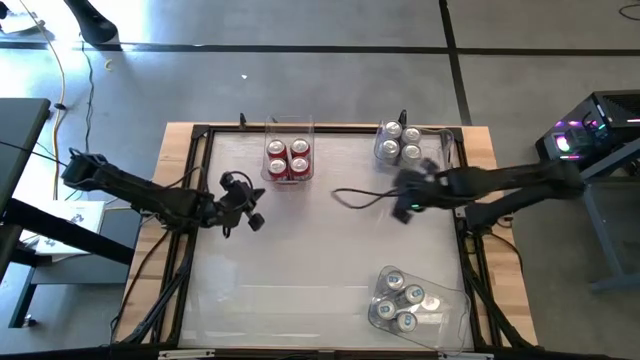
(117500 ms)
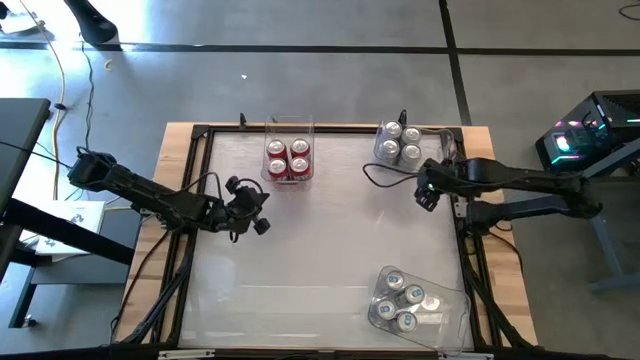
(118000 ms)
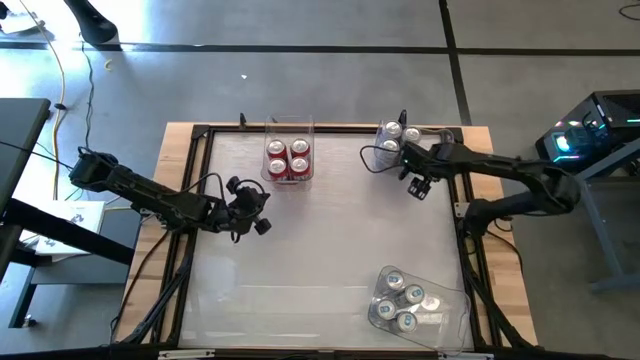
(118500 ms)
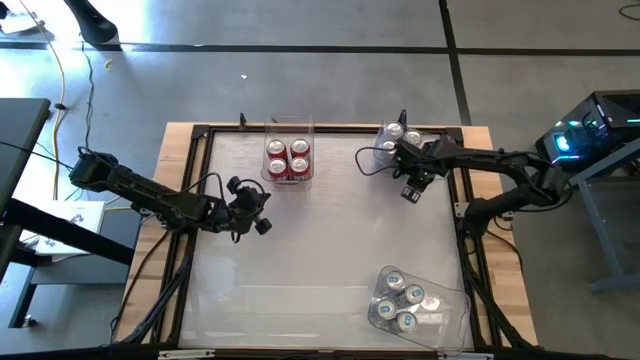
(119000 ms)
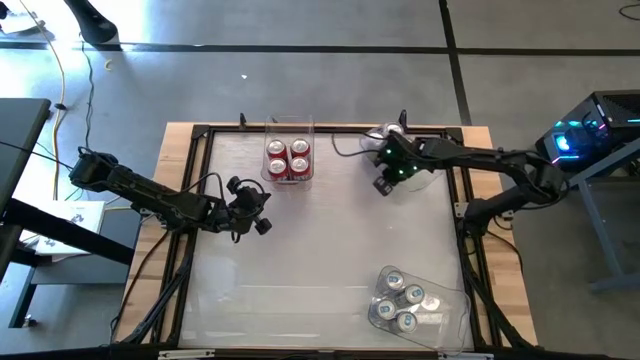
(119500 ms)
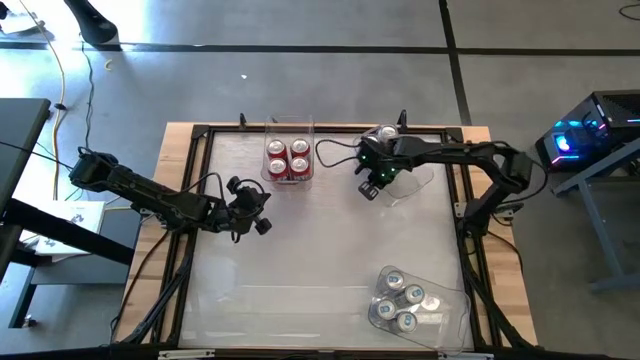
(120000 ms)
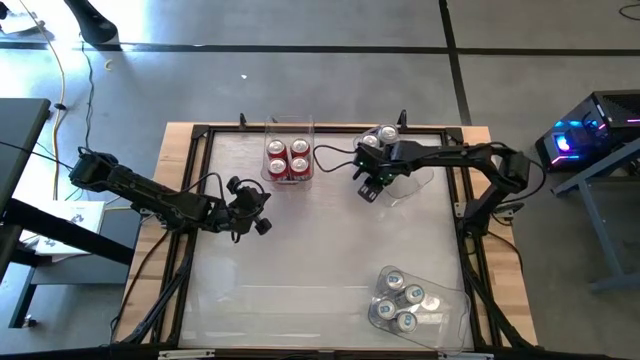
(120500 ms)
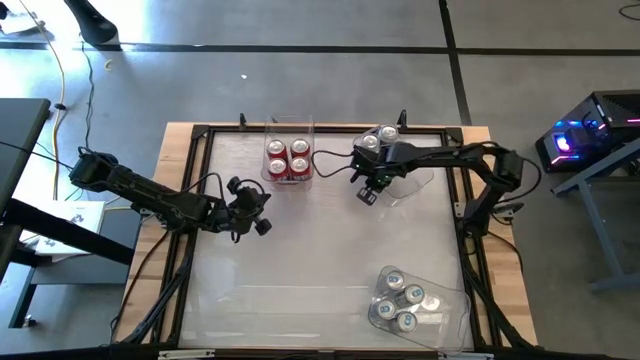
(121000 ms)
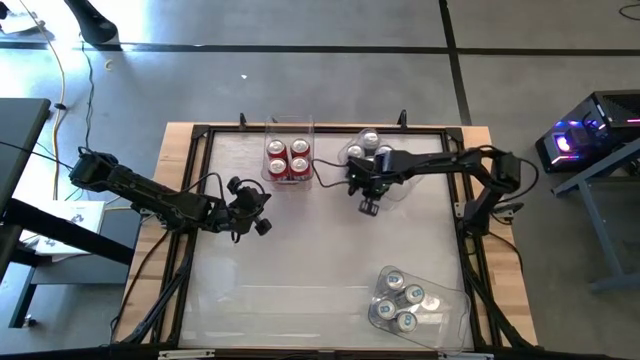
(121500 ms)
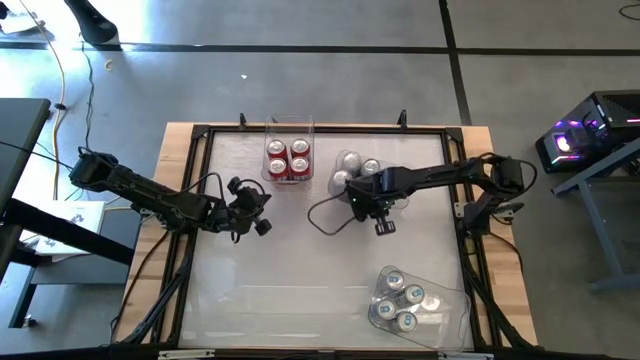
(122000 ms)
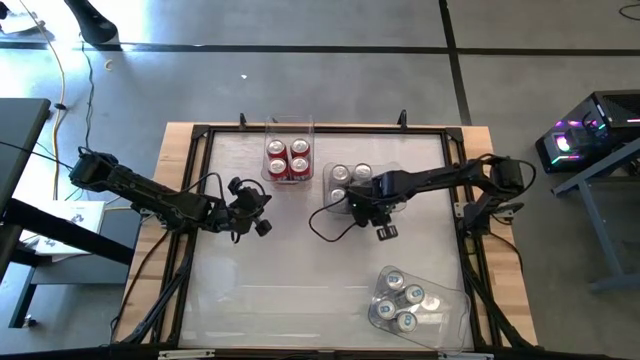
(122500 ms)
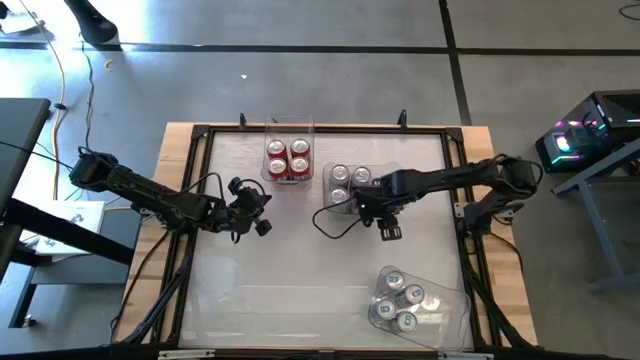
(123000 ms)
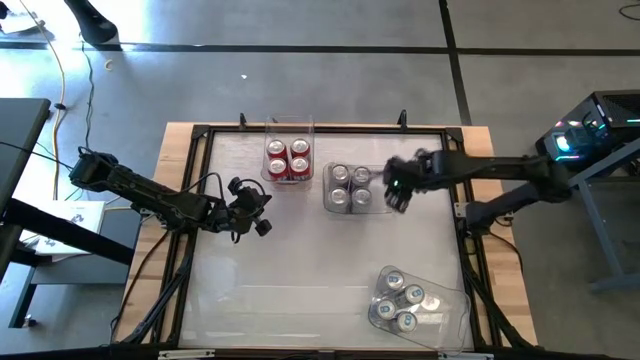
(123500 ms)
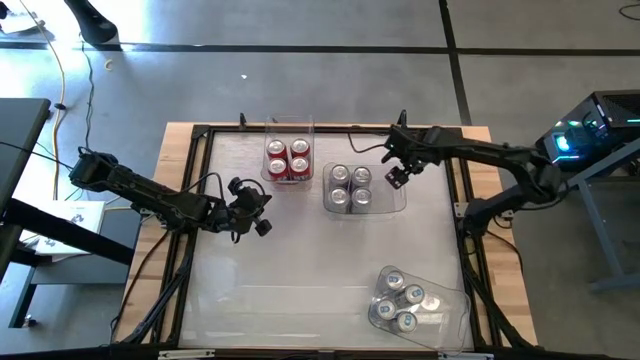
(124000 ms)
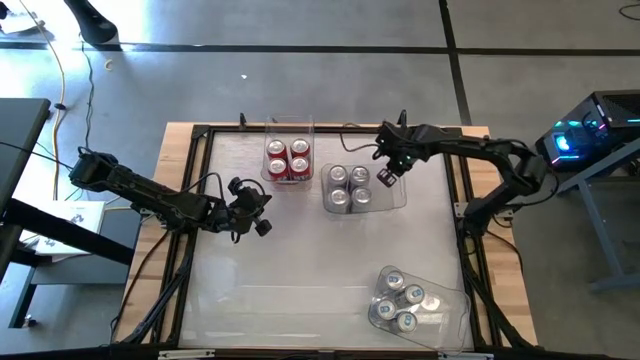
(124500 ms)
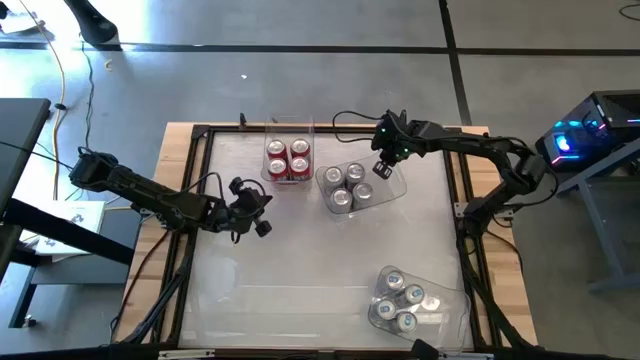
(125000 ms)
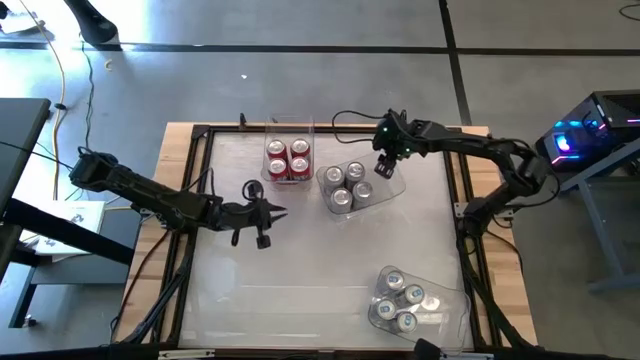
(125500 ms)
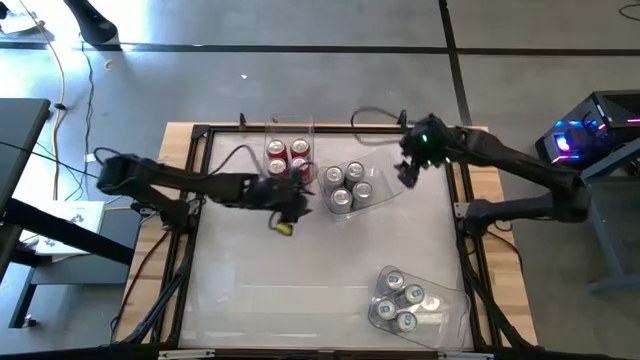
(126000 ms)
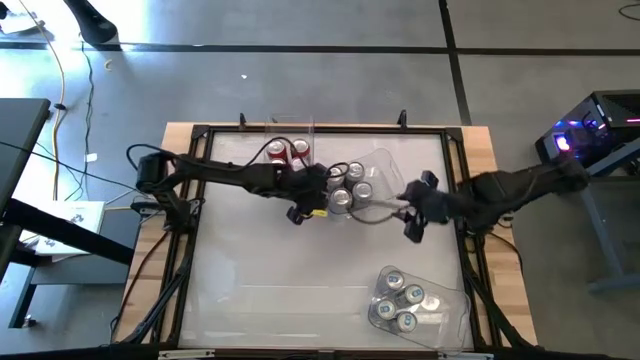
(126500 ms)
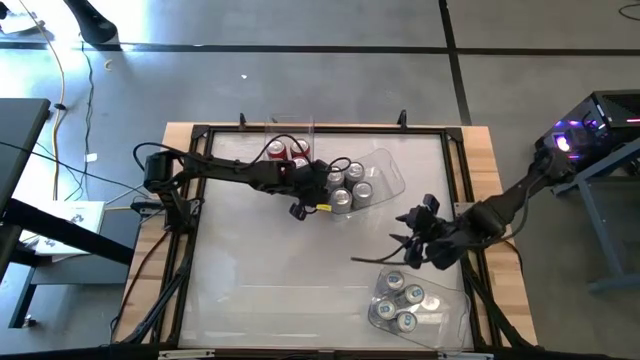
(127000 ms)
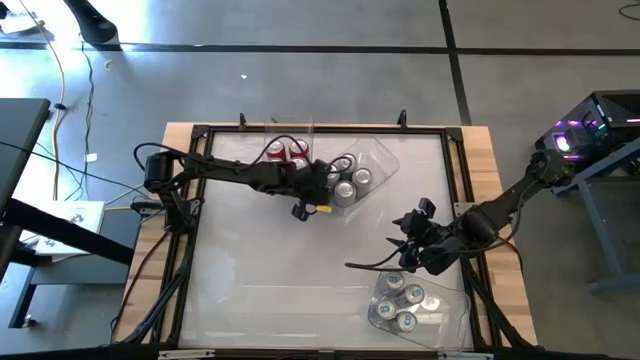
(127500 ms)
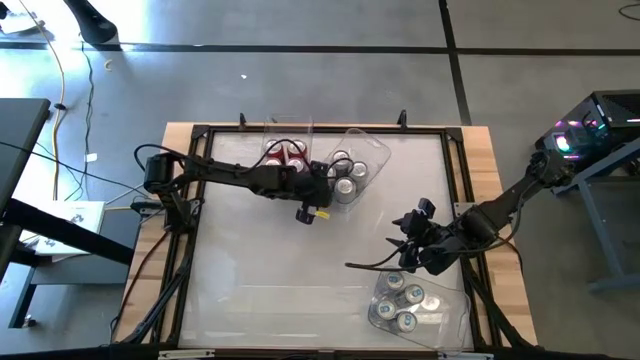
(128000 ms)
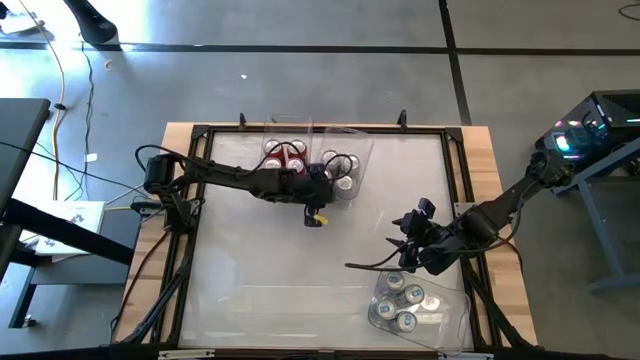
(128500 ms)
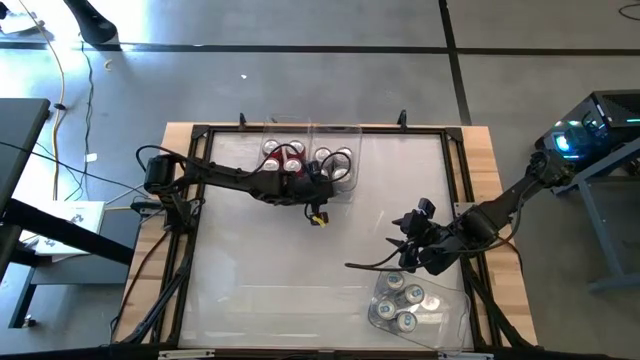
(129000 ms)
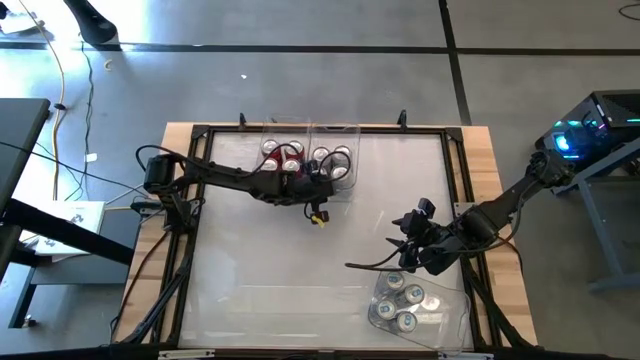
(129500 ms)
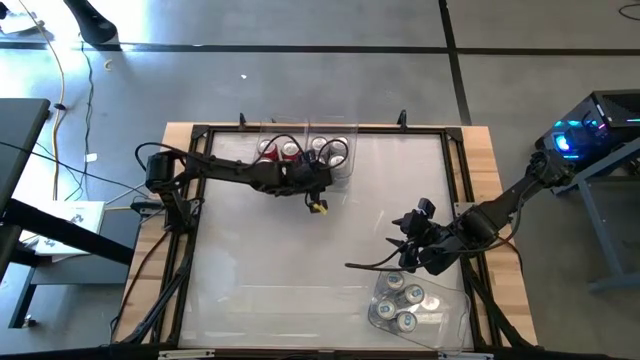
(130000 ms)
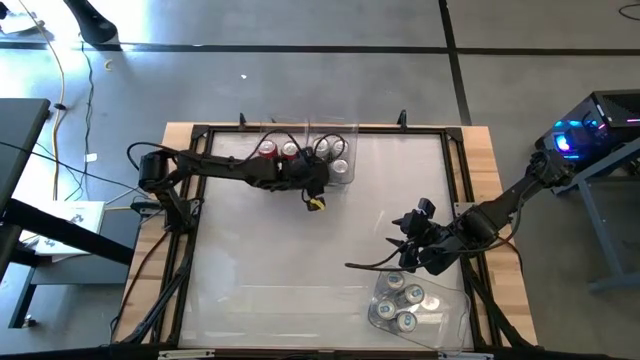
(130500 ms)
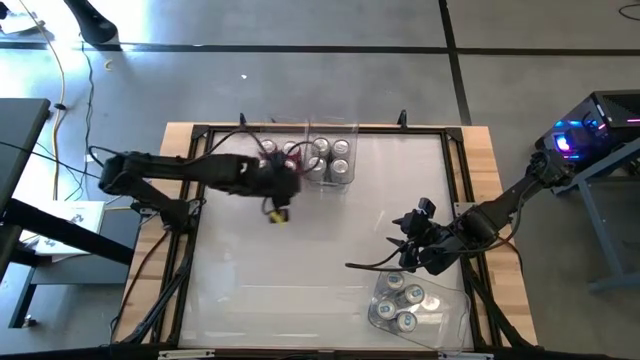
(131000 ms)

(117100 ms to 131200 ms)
Task: Sort soda cans
Move the top right transparent bin to the top middle of the table

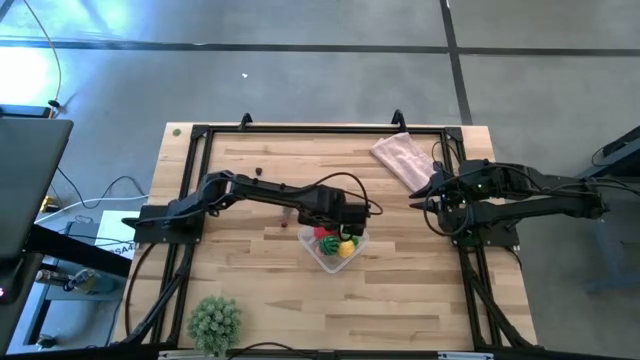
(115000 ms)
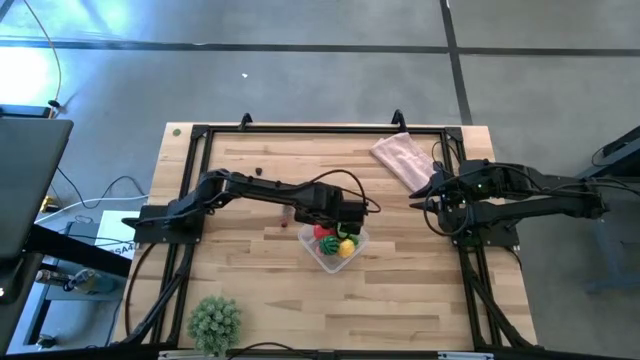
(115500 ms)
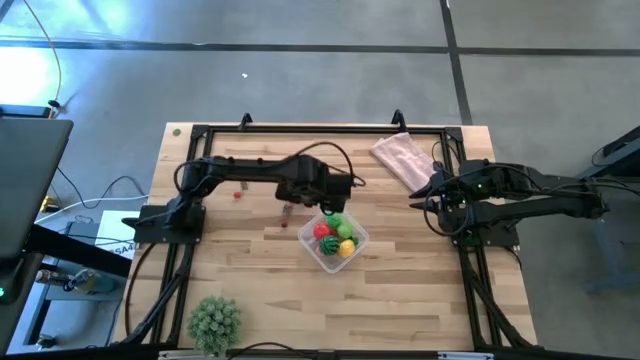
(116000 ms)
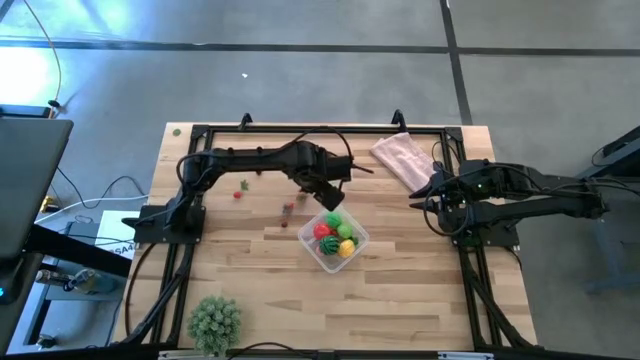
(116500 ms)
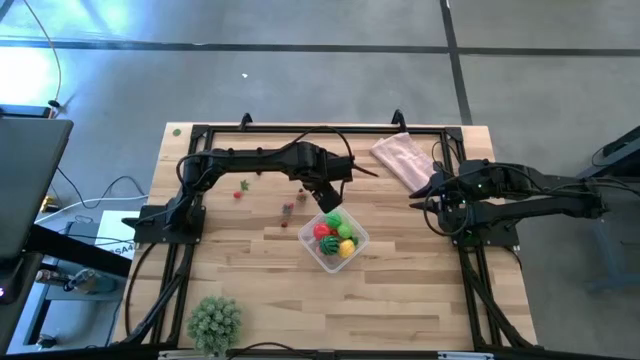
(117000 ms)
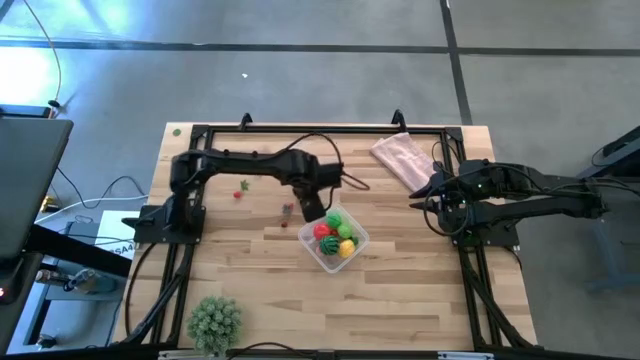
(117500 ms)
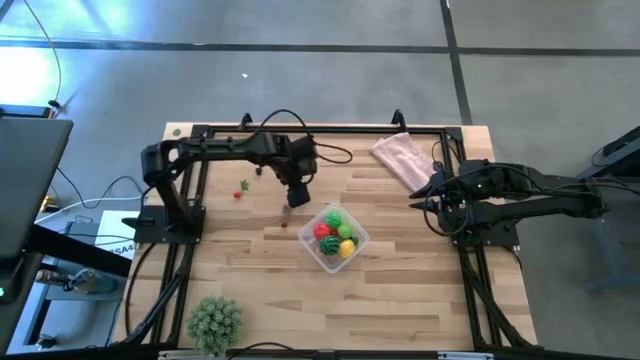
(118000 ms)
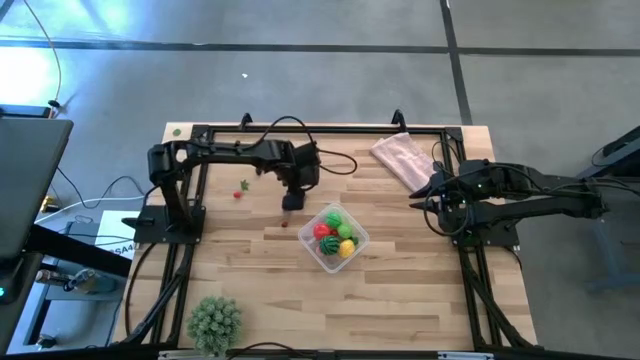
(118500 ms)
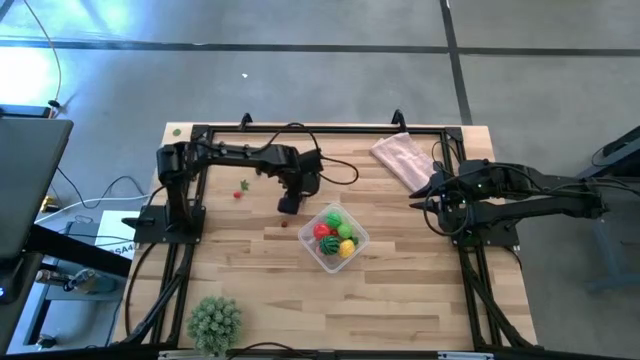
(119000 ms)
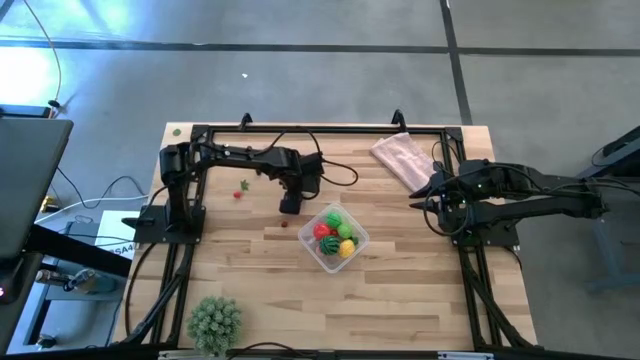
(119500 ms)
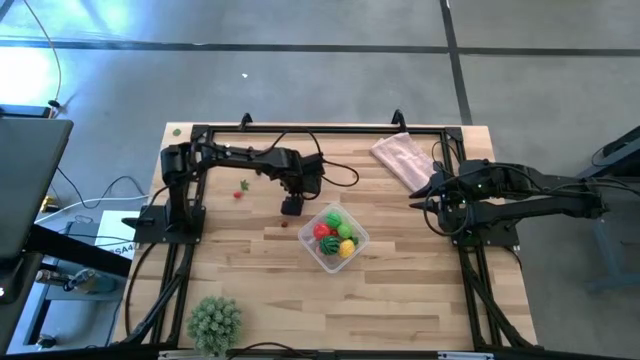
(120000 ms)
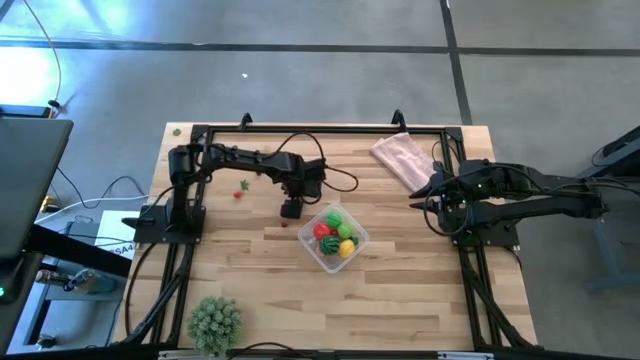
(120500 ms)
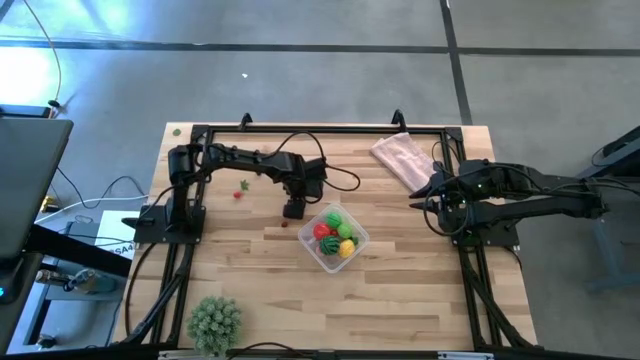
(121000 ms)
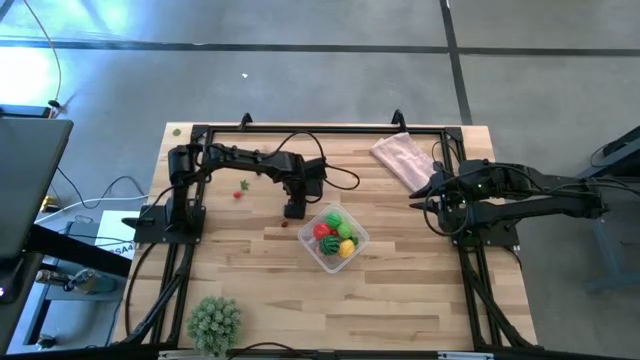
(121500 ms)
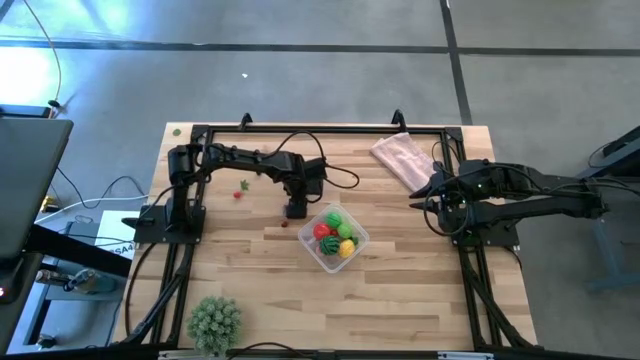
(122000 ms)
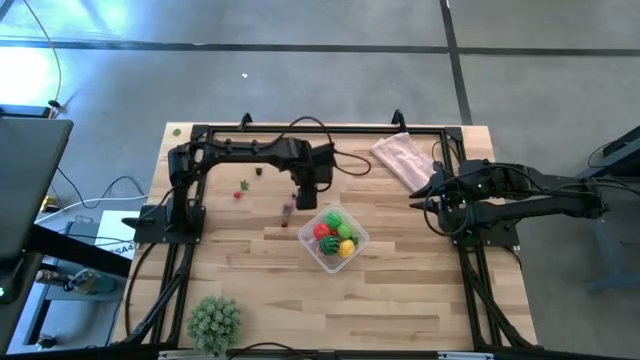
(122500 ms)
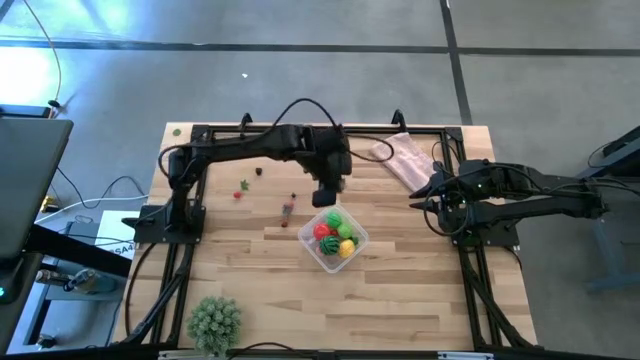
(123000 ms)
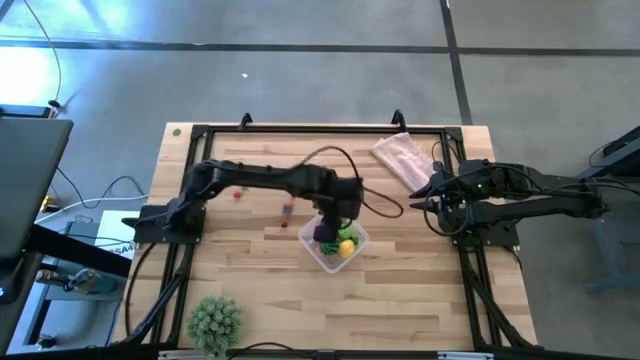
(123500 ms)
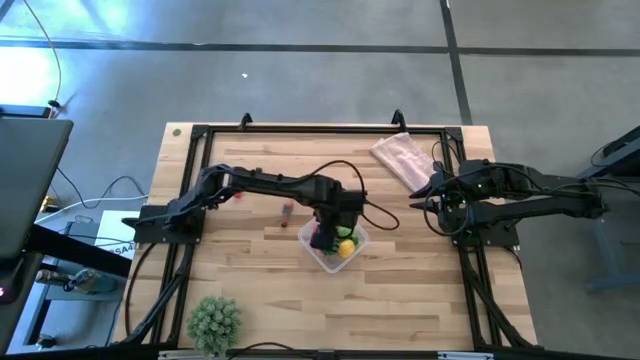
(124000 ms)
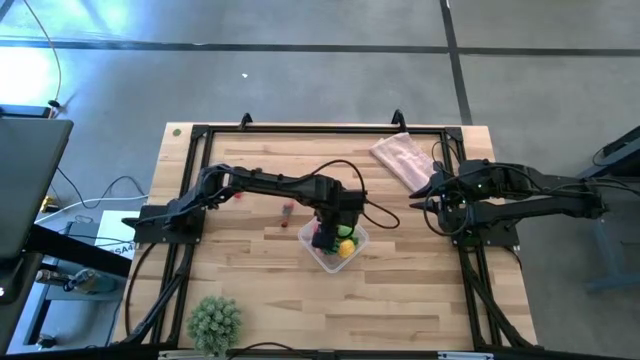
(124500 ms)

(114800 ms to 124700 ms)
Task: Pick and placing Produce into tupperware
Put the top red strawberry into the transparent container
